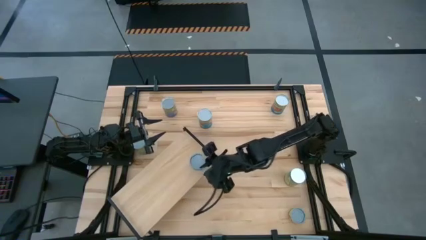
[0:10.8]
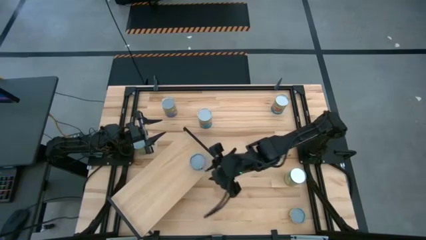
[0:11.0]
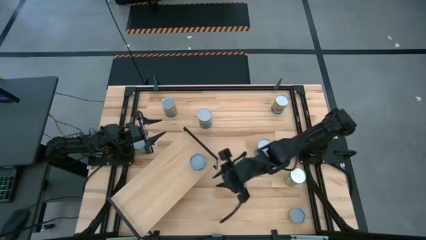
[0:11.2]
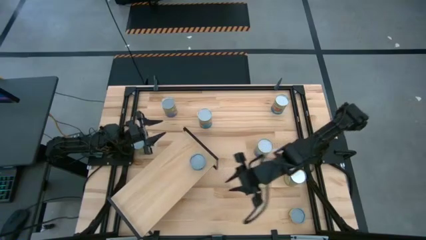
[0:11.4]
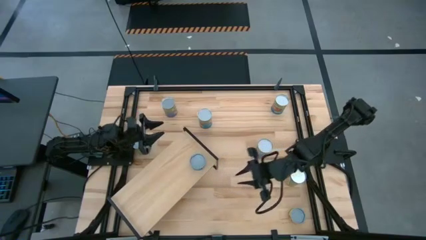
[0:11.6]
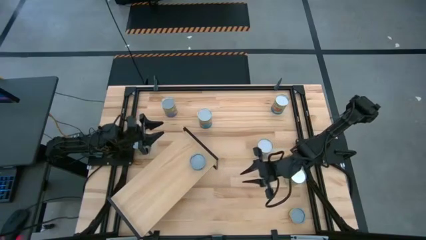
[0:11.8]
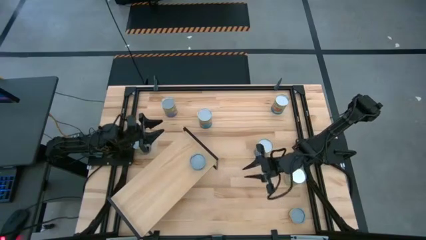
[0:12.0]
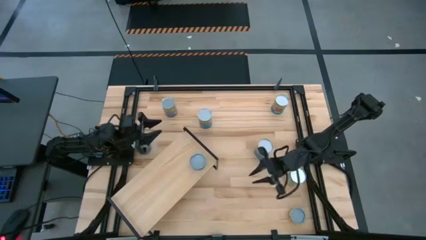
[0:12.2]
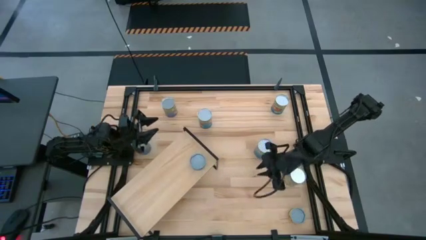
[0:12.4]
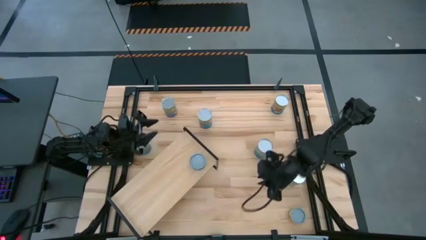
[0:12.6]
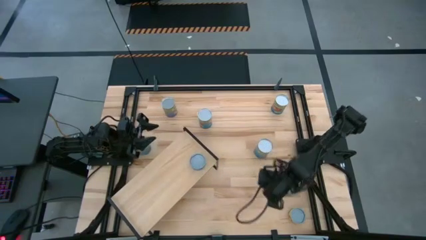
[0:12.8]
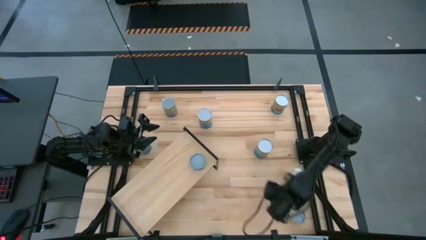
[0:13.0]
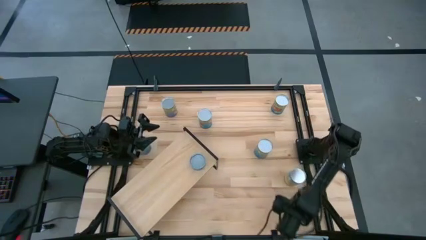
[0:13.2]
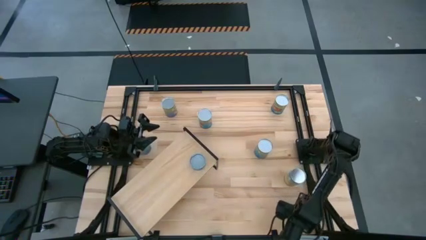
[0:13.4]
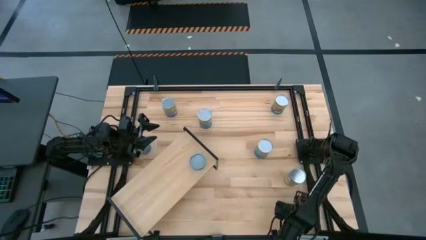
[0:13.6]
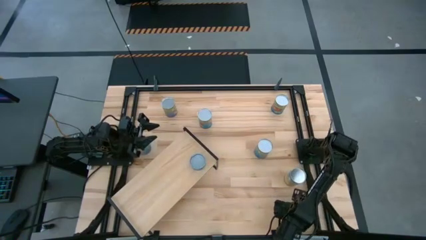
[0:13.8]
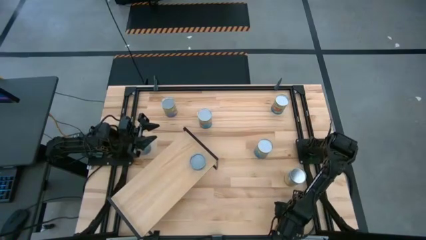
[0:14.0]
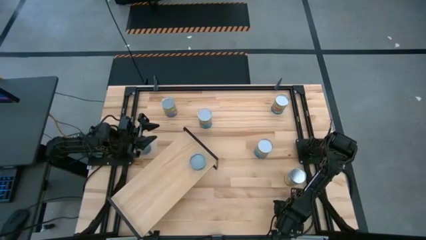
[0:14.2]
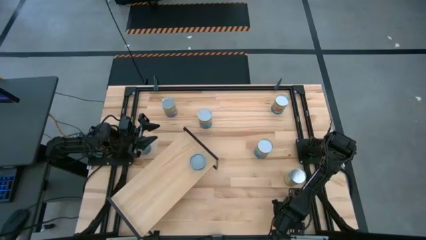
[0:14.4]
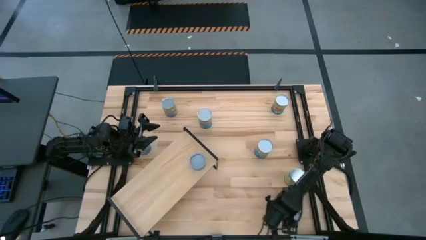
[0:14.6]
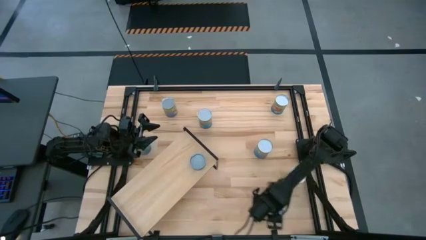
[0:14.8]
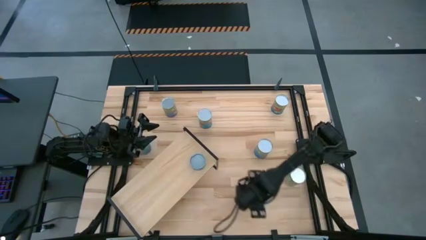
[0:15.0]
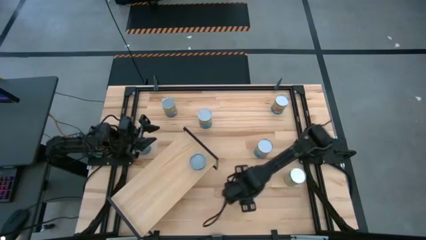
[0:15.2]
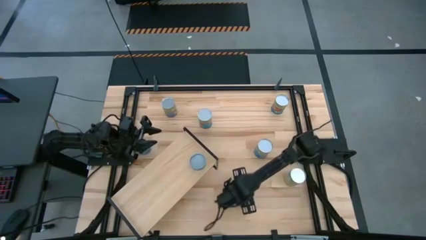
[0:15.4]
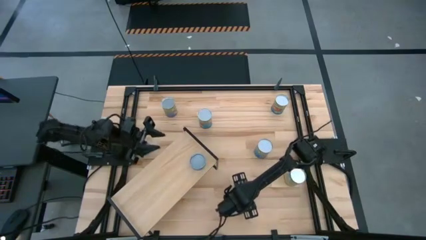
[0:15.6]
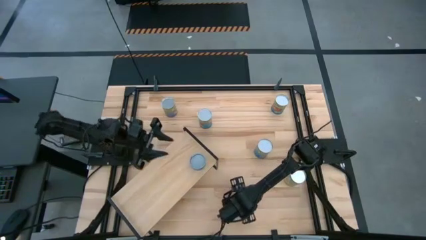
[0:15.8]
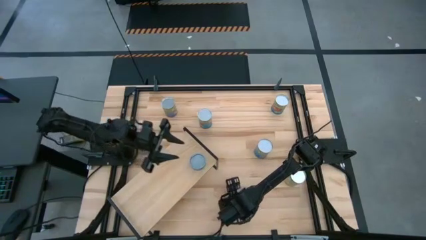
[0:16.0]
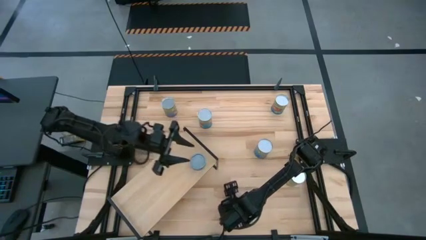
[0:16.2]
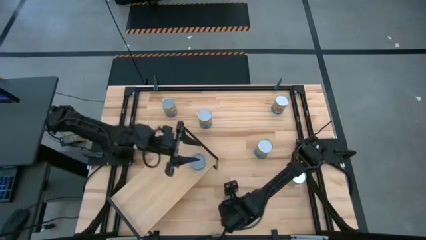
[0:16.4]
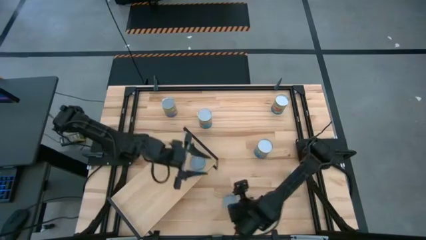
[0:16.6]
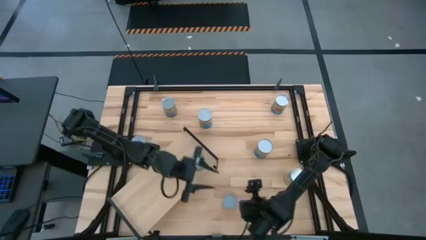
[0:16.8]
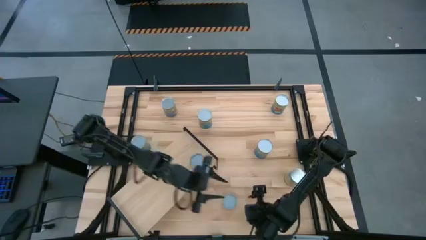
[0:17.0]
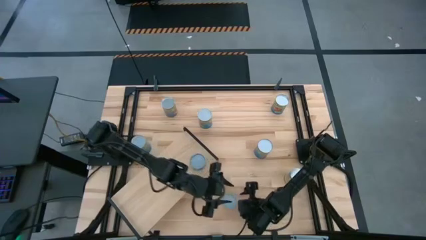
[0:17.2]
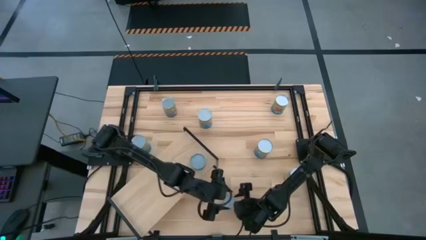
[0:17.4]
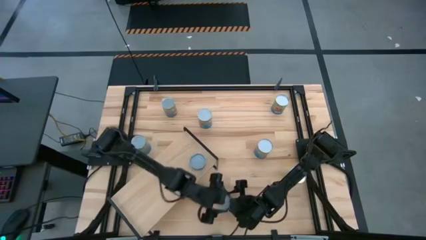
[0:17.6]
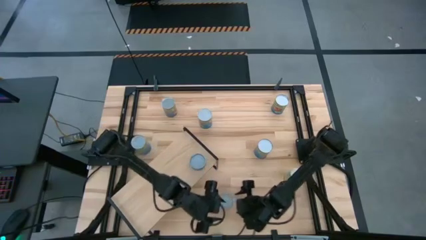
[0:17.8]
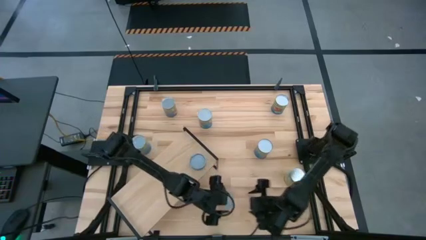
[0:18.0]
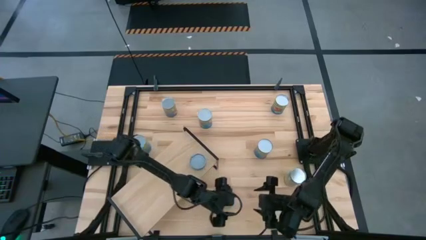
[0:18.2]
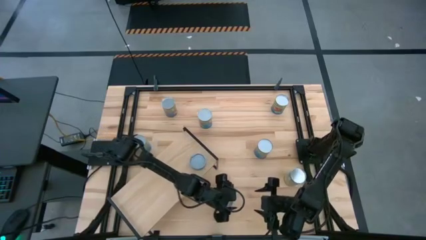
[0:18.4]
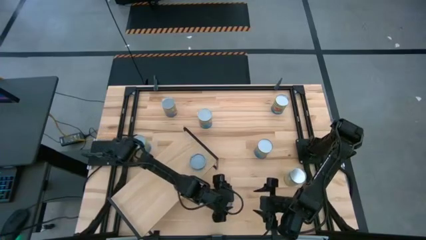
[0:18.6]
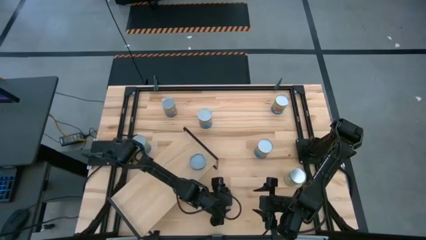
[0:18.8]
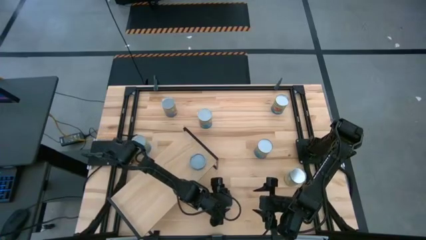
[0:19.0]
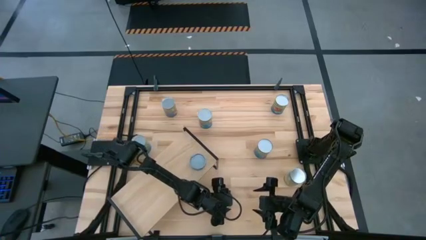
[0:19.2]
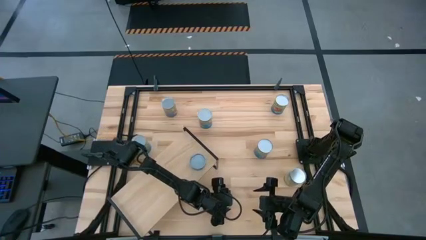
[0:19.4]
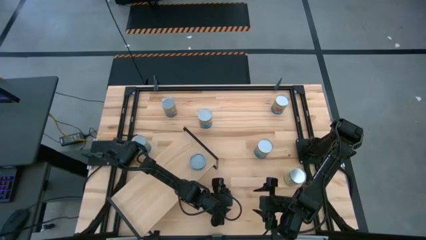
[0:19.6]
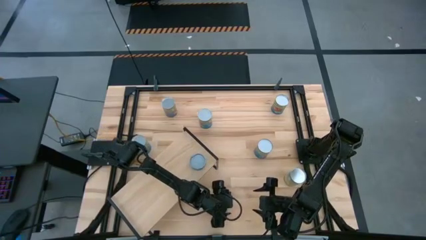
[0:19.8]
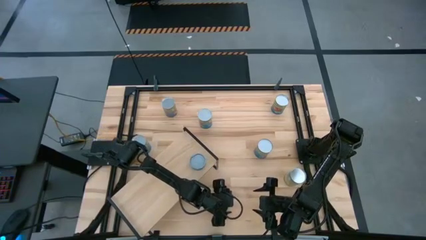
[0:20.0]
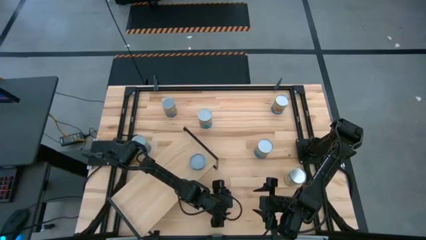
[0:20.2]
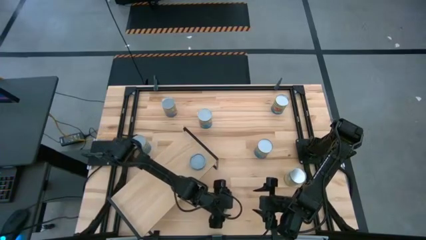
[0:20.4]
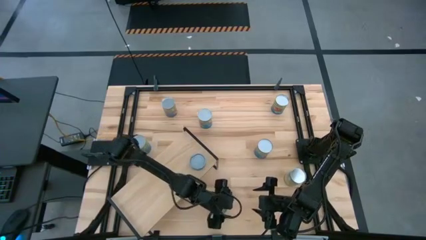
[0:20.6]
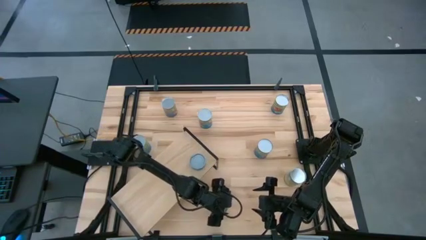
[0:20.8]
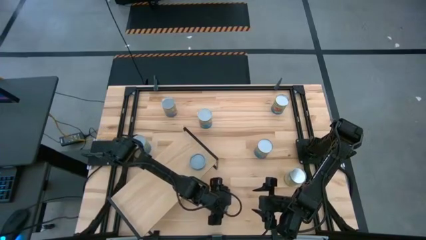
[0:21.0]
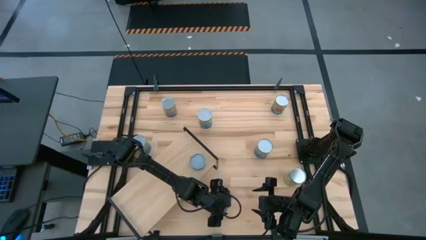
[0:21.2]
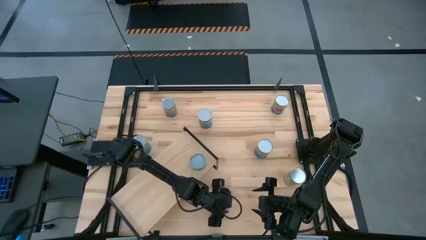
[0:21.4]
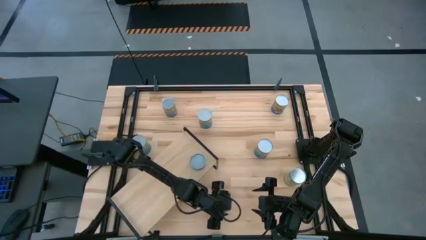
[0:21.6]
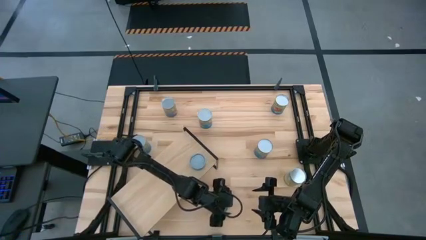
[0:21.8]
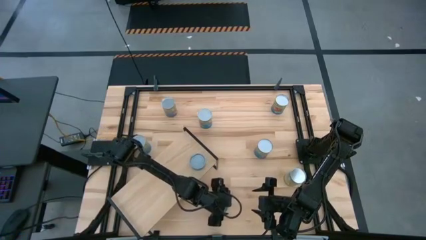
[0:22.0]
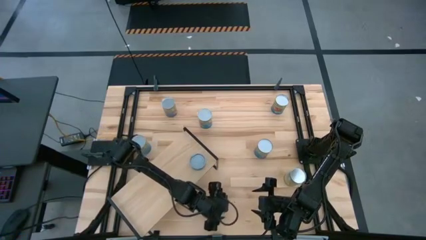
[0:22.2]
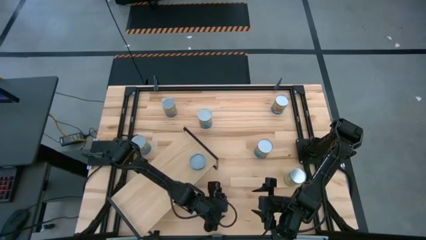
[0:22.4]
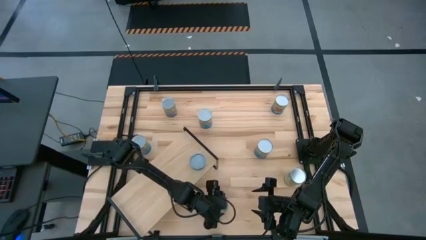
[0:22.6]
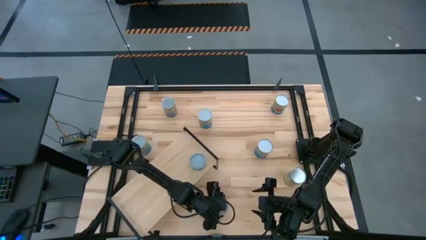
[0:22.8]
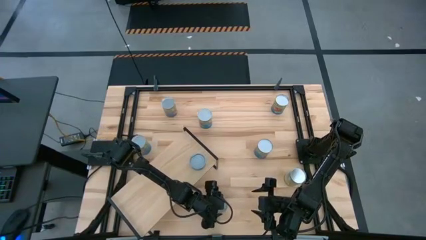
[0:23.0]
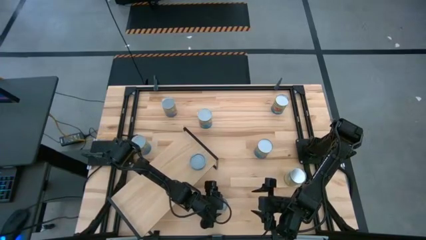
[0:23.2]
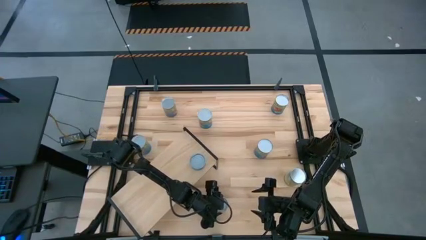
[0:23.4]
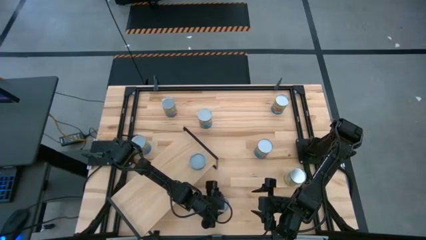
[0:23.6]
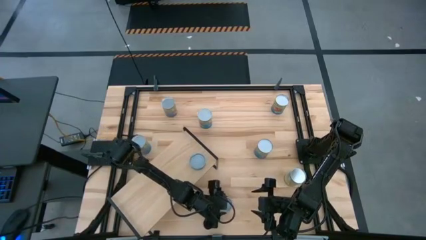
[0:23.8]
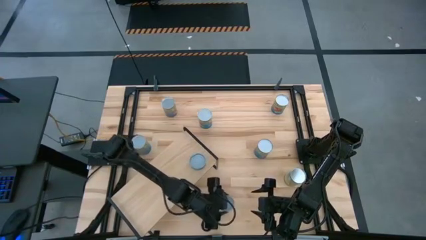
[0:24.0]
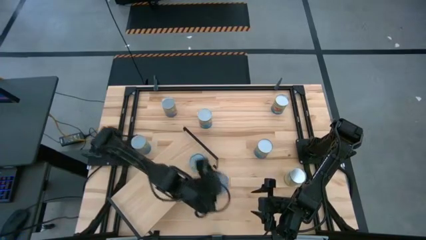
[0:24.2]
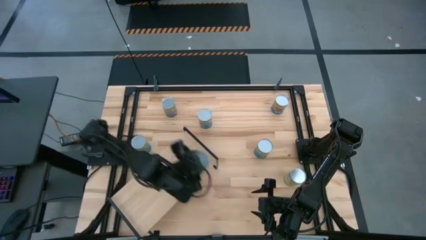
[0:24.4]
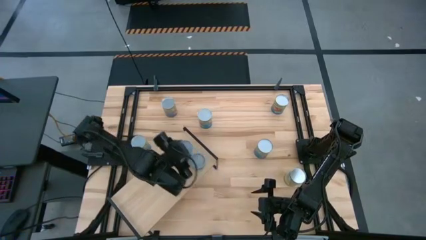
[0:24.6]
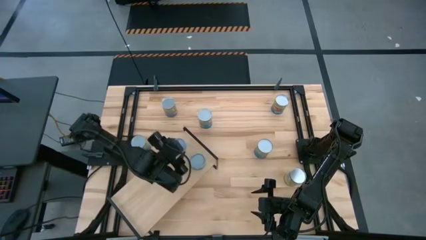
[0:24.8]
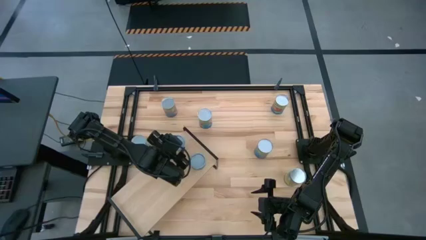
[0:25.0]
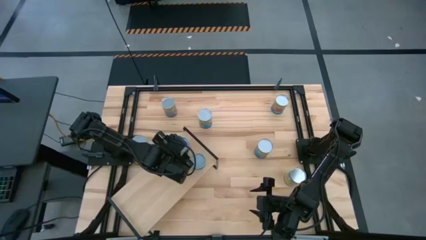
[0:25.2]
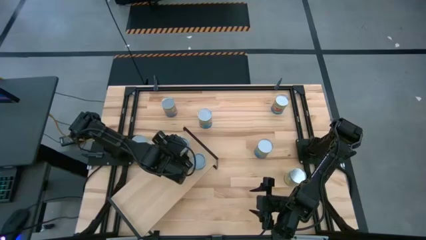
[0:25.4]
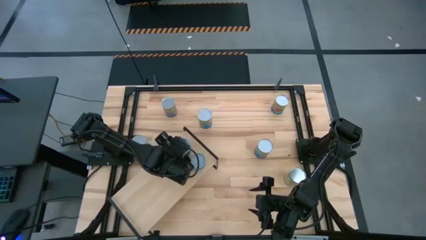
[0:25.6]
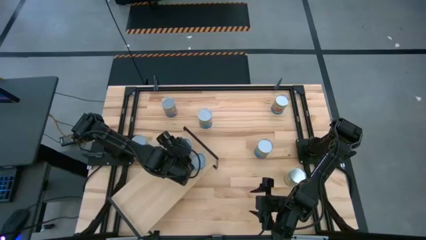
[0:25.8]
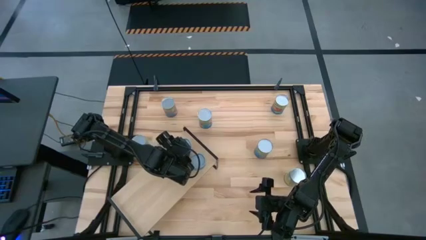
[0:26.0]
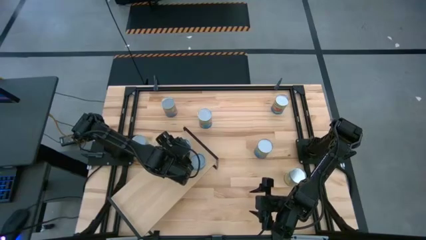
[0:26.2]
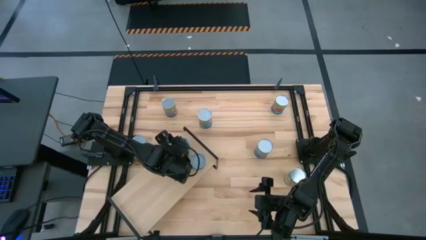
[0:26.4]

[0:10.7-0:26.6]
Task: Pick and place cans onto a shelf
Put the canned mushroom on the shelf
